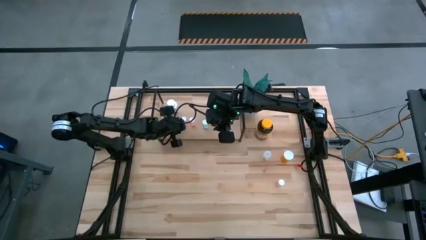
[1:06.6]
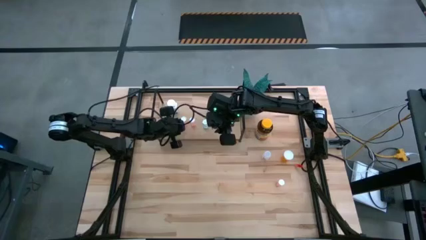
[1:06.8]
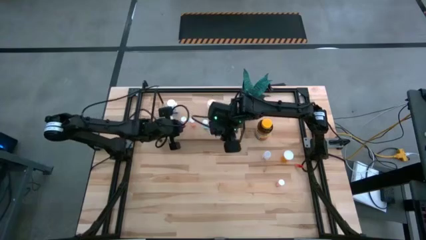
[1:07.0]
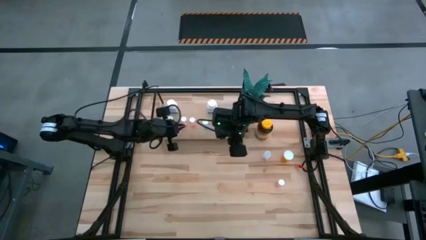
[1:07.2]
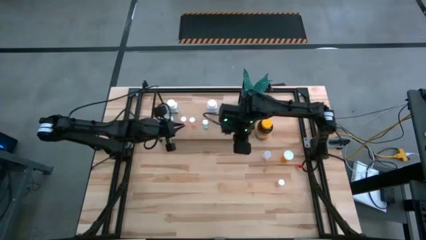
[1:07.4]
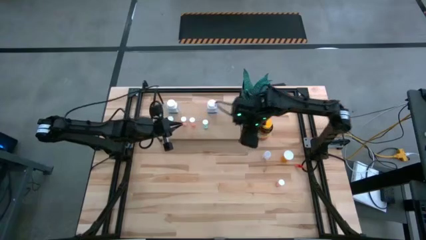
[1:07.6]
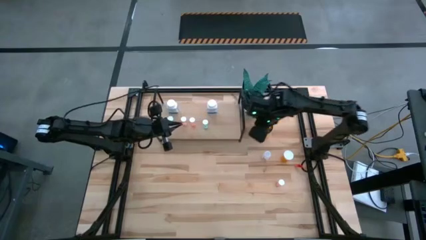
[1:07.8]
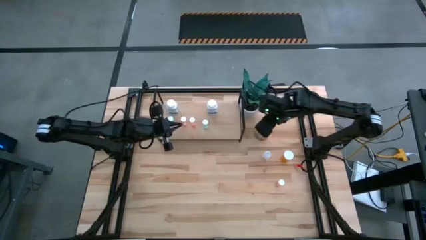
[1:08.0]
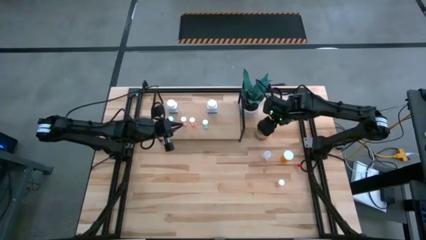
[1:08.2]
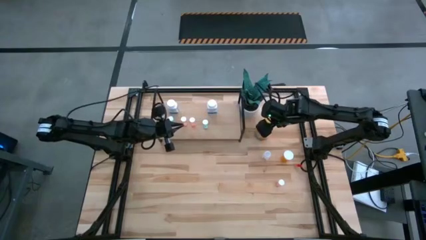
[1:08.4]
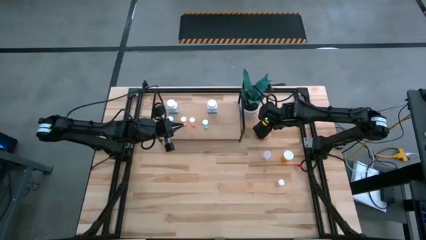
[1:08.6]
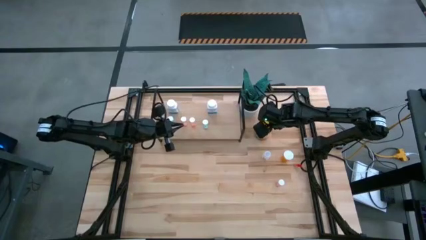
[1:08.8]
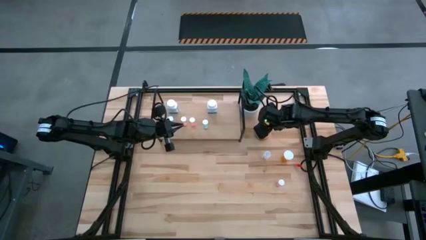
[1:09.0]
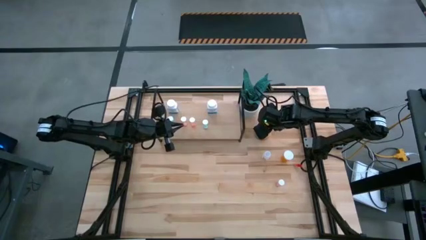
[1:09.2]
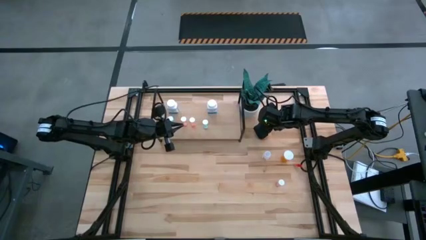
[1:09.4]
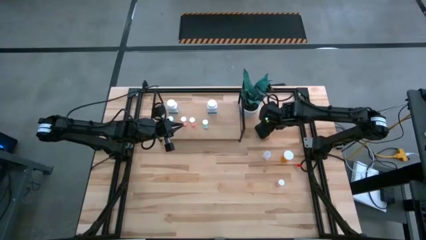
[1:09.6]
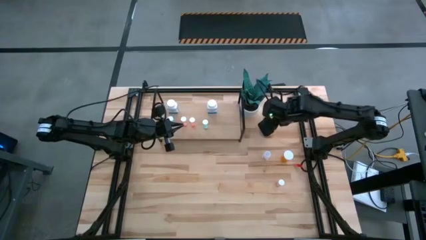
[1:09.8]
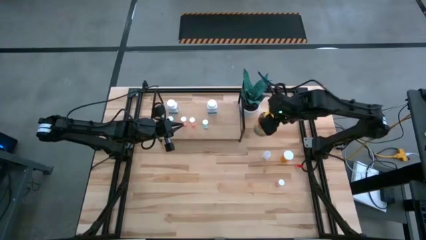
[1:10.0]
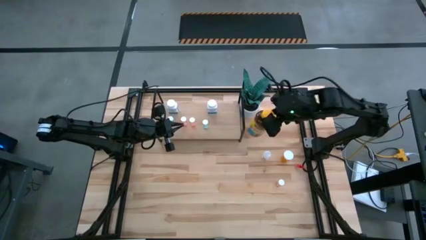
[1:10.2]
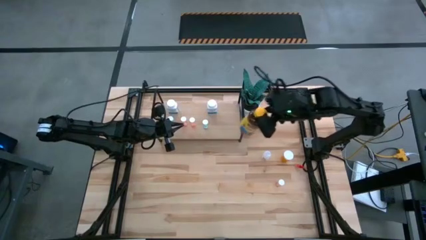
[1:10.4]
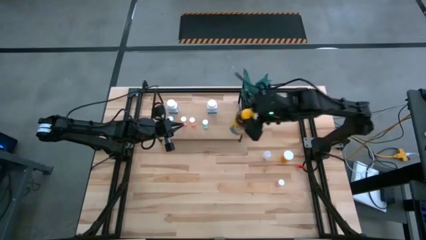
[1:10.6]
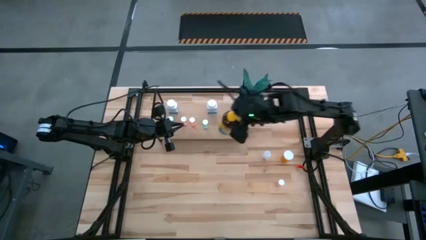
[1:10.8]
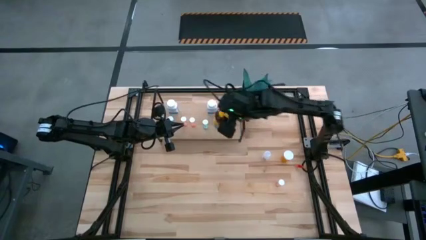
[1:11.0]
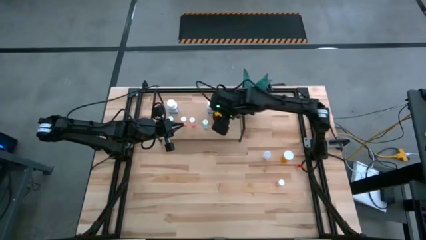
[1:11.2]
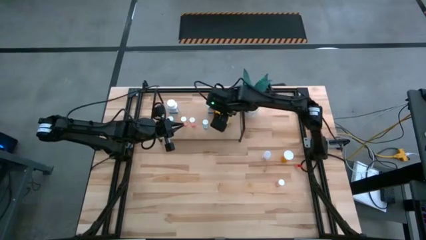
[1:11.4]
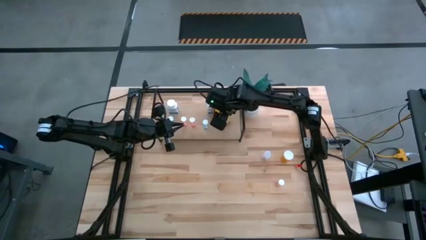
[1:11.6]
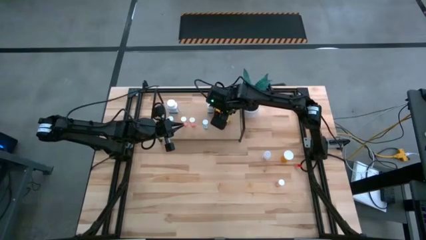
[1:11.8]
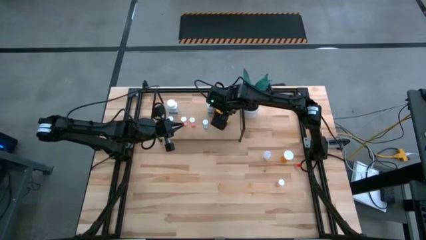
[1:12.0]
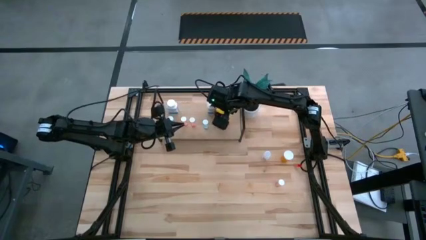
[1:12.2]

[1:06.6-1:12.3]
Task: Pick and place medicine bottles onto shelf by color
Put the yellow medicine bottle on the shelf

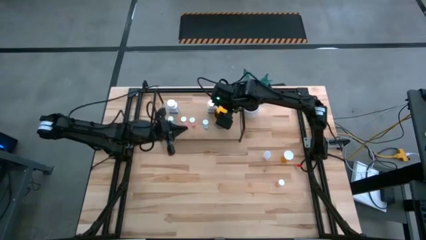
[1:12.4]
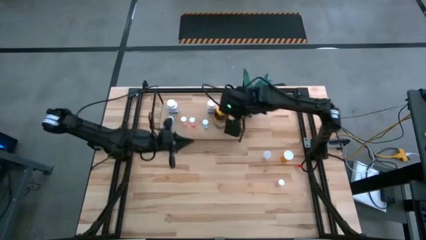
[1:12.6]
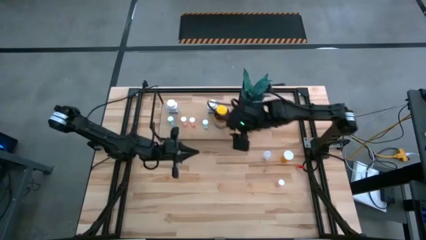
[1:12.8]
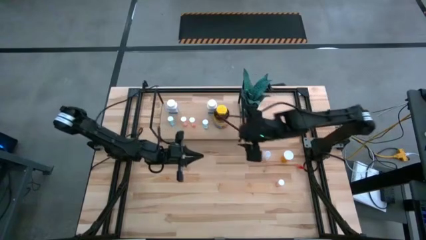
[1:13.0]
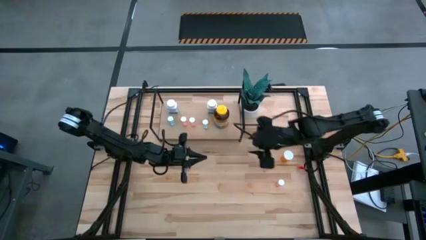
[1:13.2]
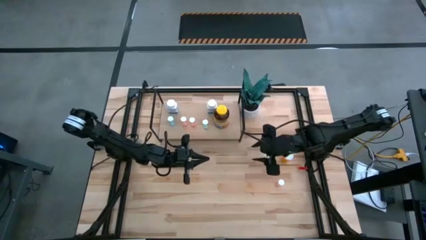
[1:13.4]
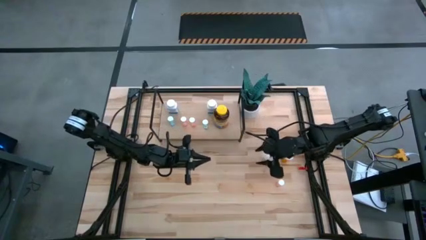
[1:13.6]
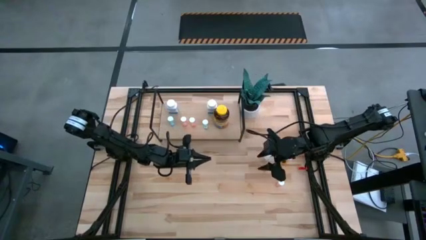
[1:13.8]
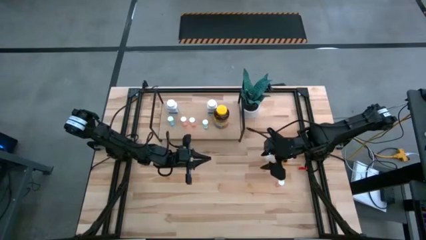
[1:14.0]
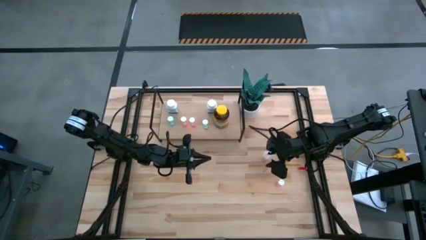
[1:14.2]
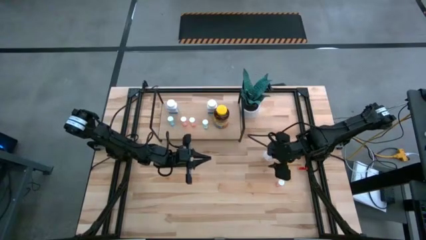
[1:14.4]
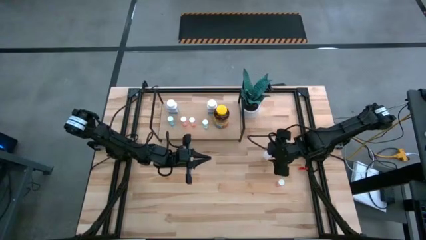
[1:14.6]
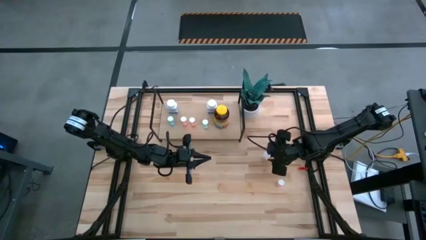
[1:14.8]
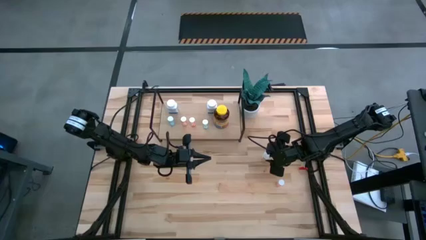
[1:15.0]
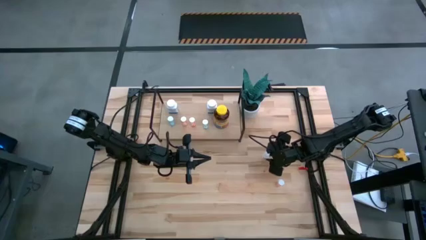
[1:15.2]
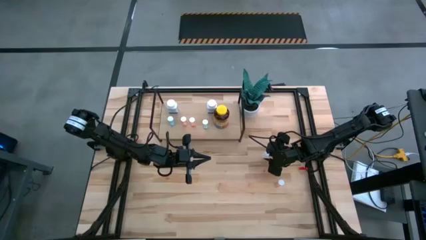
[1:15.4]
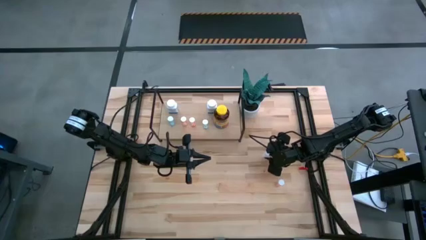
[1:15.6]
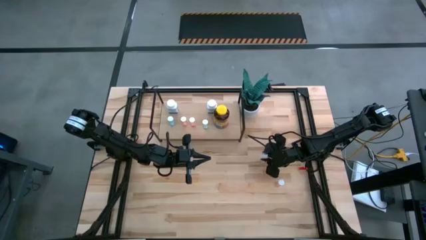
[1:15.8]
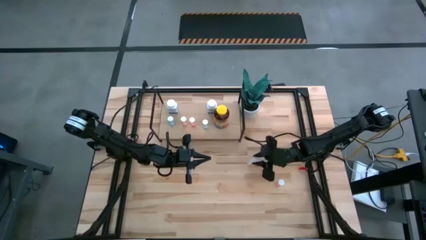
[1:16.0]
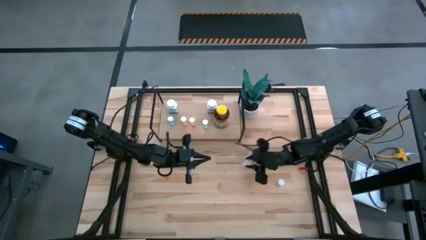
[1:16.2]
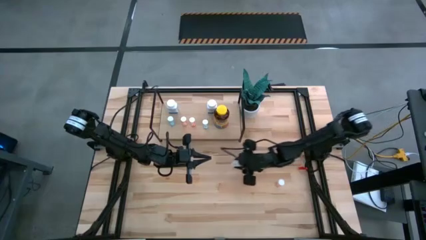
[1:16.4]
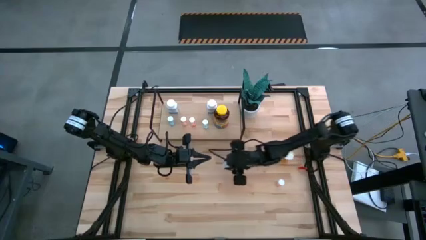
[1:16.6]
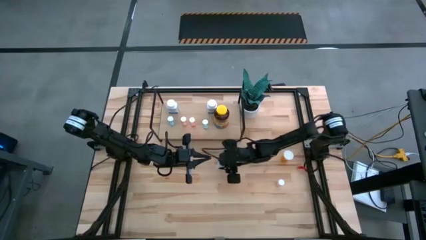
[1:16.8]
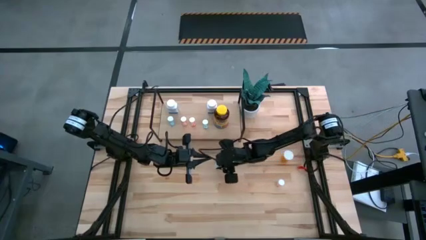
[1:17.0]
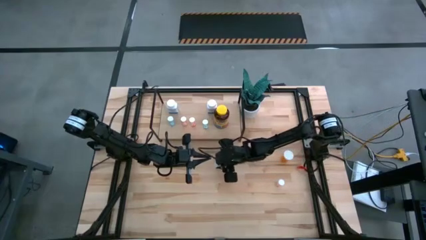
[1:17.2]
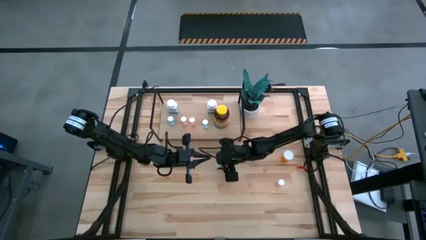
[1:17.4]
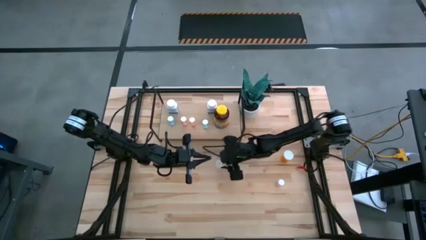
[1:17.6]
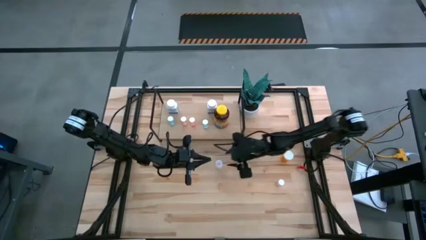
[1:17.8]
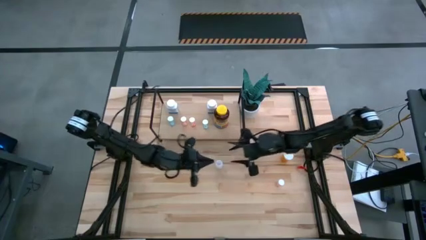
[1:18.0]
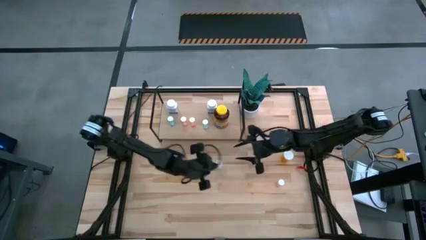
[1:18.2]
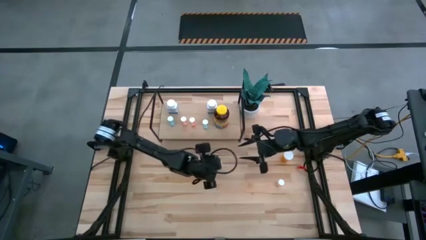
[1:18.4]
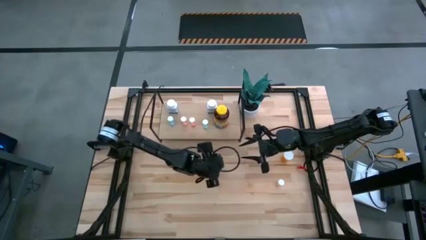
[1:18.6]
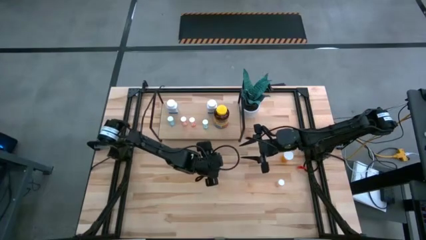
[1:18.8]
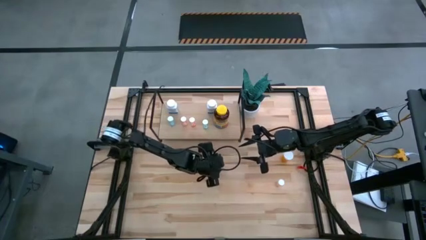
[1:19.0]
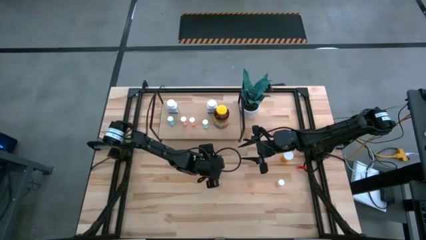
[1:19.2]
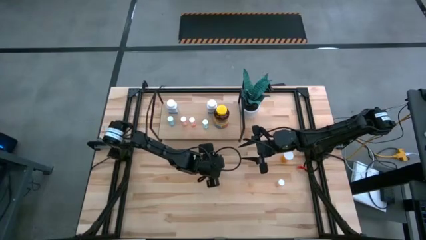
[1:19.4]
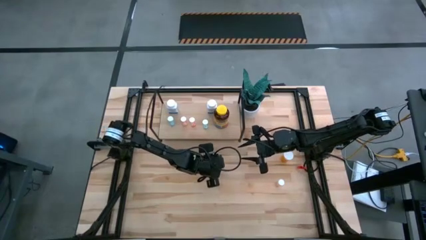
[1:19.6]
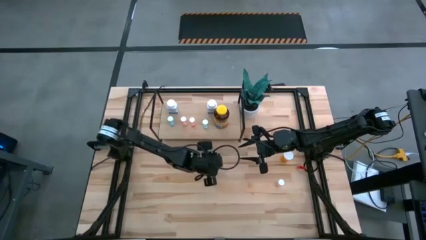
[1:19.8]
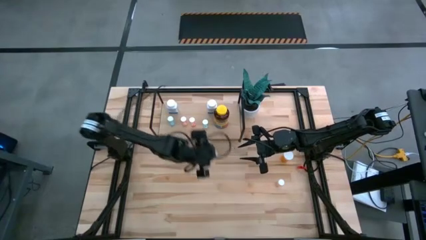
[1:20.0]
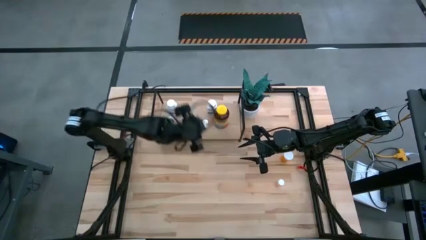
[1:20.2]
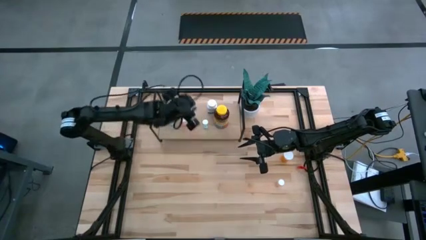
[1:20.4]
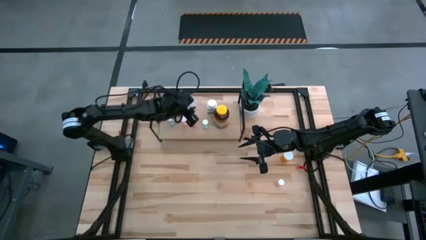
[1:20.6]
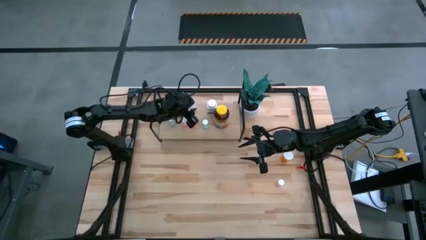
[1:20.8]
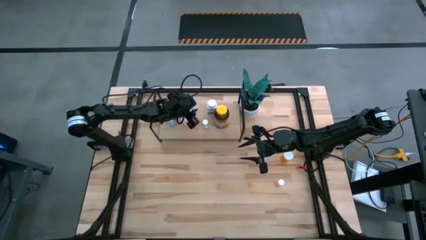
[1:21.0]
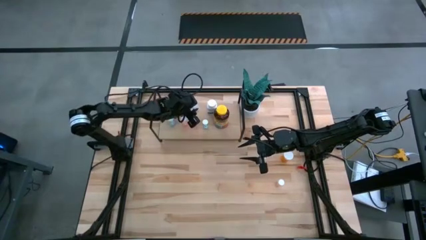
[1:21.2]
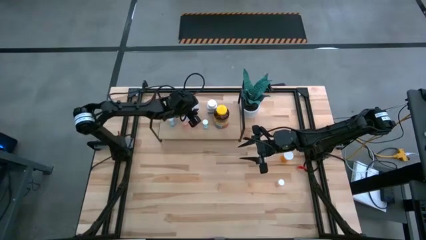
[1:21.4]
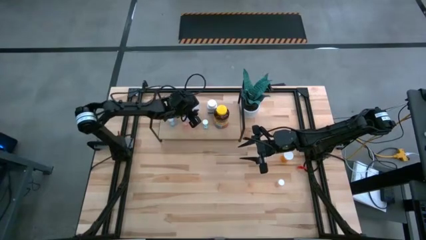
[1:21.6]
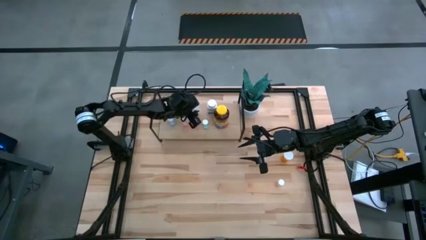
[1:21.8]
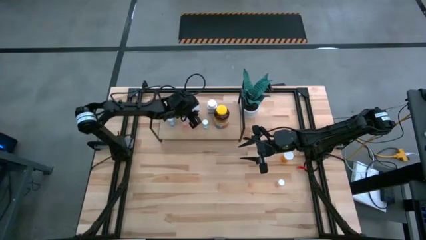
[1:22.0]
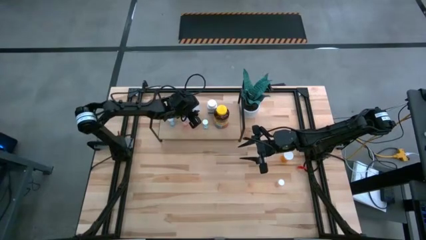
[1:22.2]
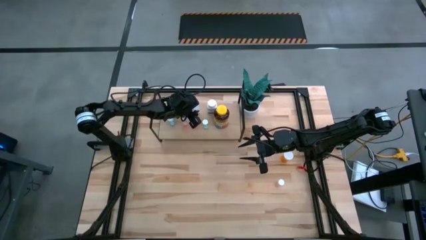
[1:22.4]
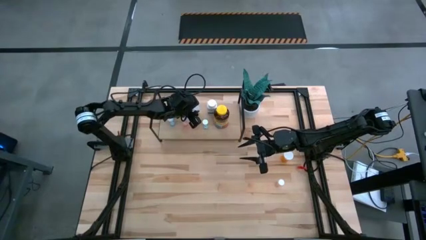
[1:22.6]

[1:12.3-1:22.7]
Put the transparent medicine bottle on the shelf
